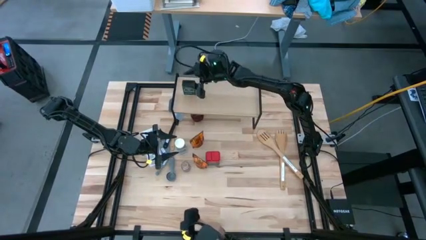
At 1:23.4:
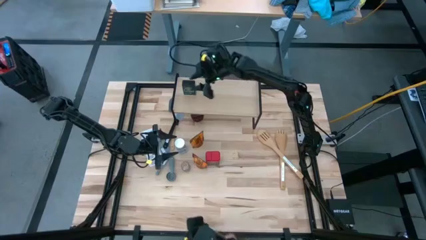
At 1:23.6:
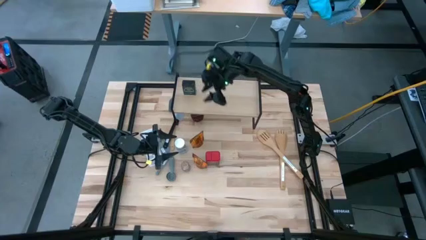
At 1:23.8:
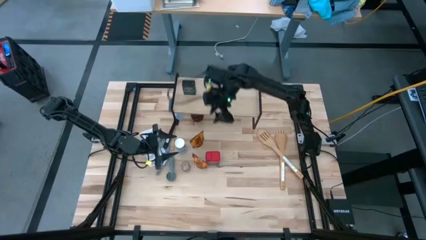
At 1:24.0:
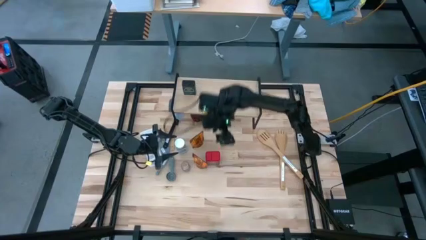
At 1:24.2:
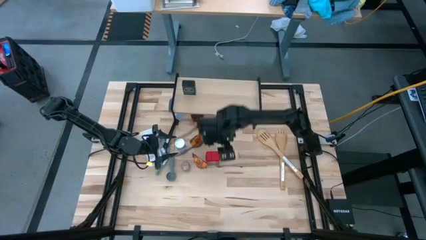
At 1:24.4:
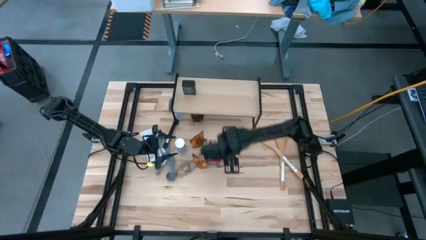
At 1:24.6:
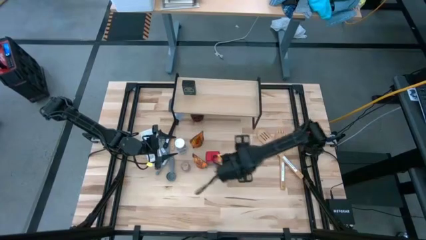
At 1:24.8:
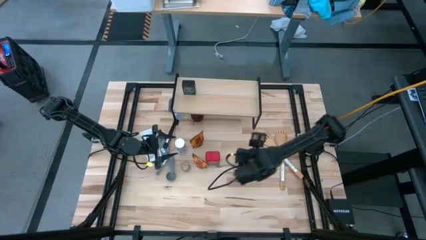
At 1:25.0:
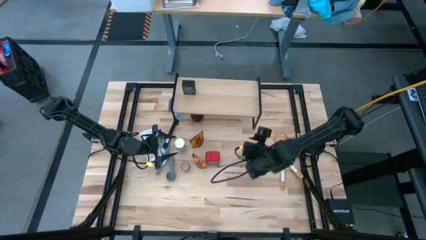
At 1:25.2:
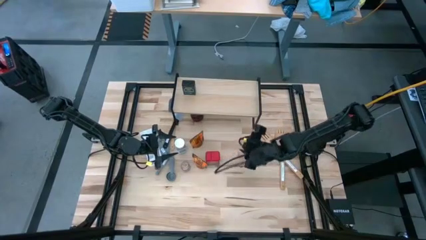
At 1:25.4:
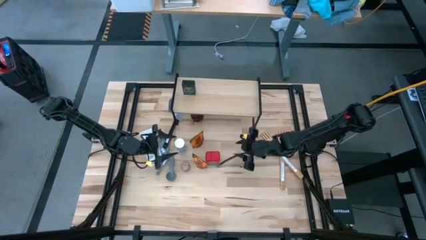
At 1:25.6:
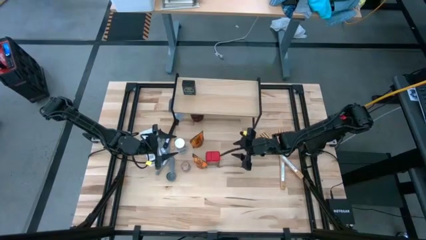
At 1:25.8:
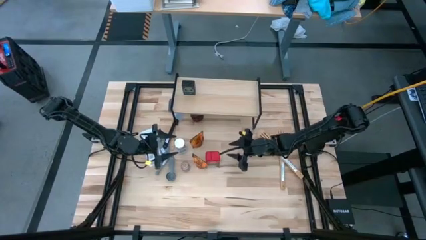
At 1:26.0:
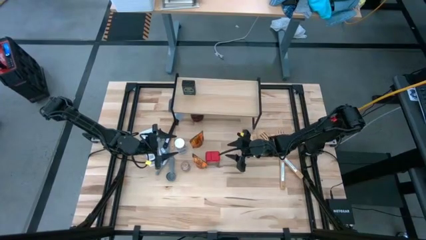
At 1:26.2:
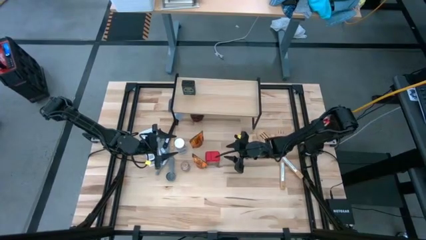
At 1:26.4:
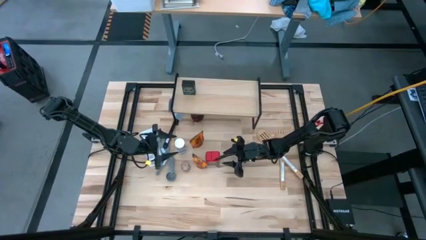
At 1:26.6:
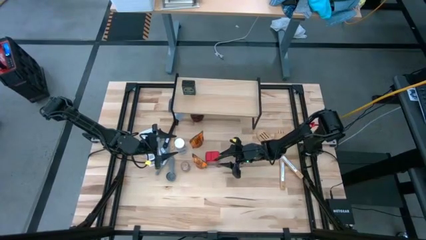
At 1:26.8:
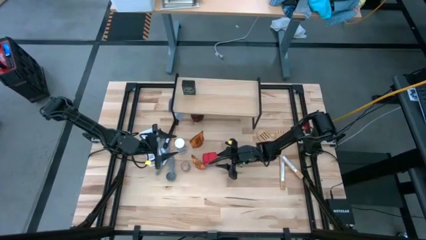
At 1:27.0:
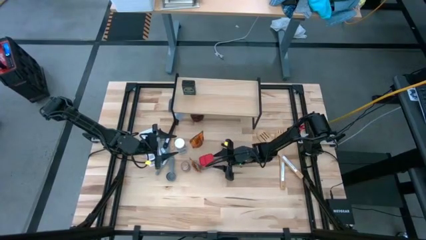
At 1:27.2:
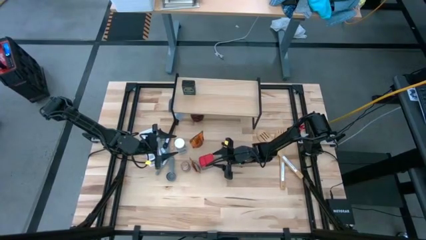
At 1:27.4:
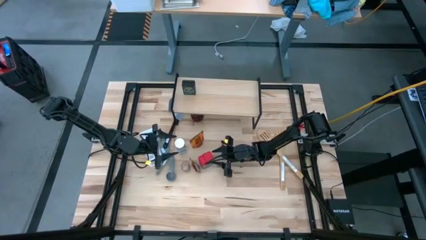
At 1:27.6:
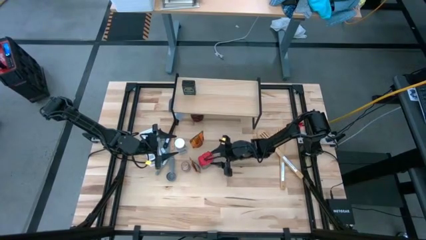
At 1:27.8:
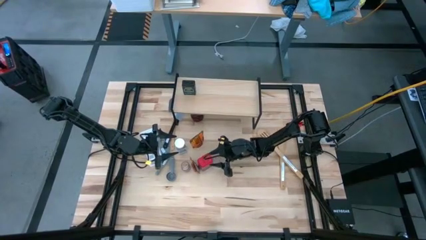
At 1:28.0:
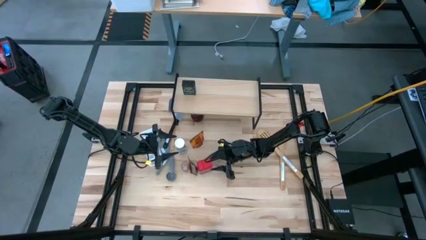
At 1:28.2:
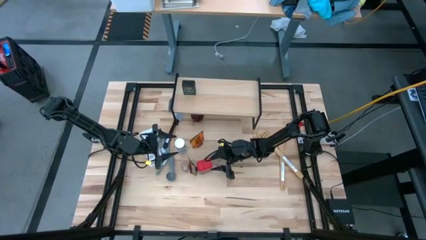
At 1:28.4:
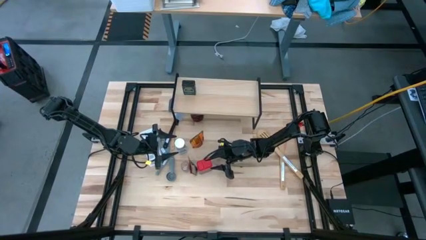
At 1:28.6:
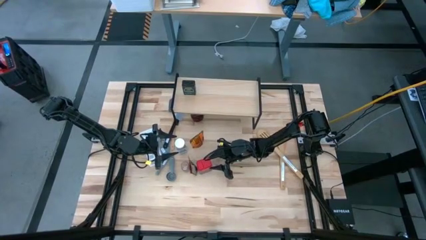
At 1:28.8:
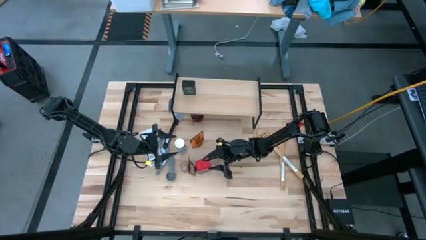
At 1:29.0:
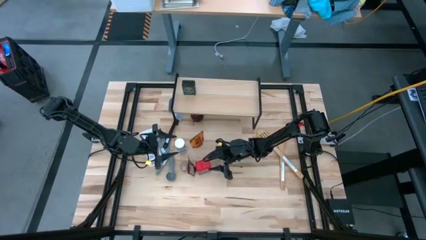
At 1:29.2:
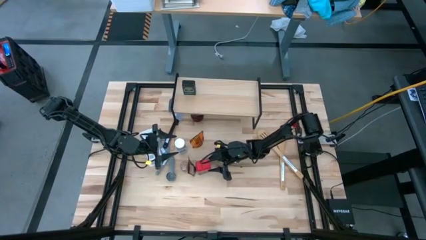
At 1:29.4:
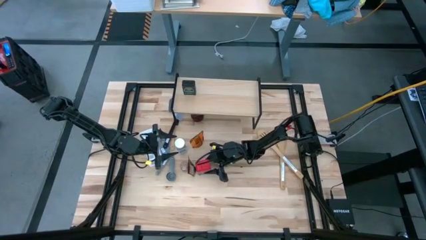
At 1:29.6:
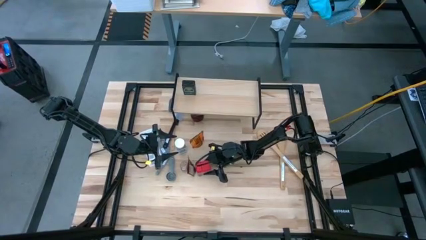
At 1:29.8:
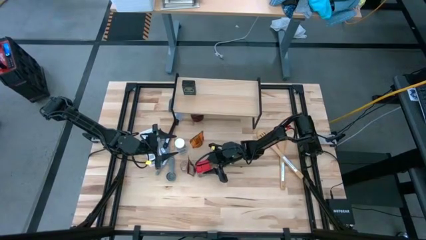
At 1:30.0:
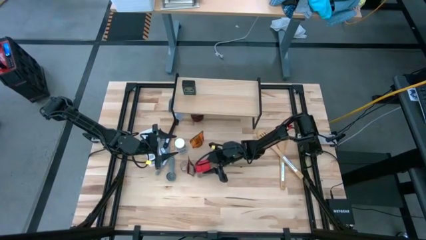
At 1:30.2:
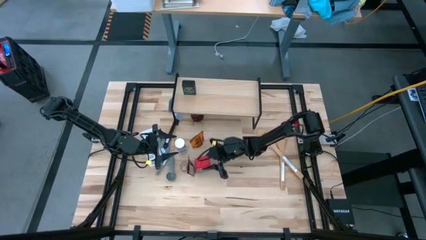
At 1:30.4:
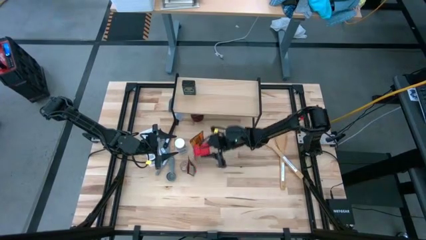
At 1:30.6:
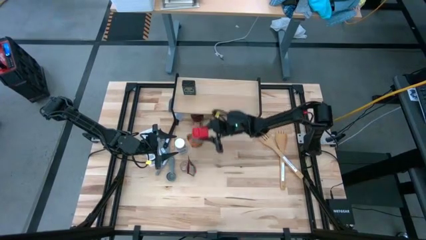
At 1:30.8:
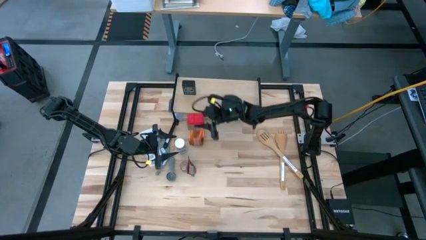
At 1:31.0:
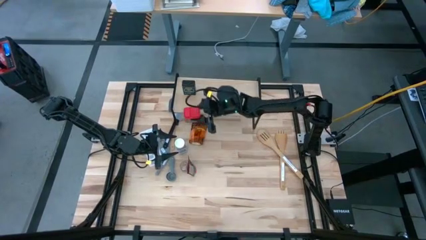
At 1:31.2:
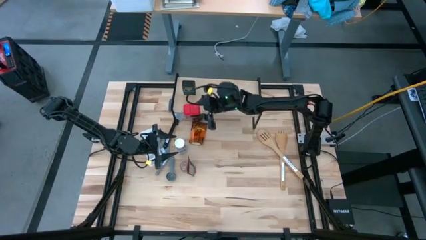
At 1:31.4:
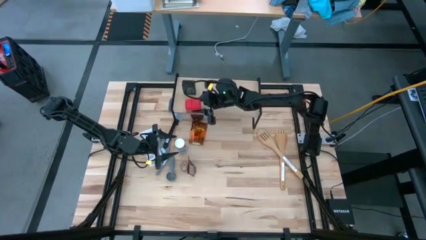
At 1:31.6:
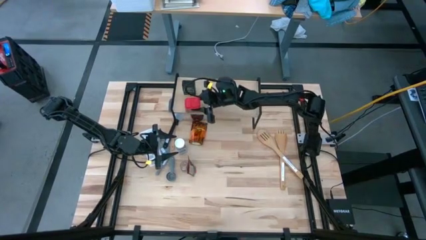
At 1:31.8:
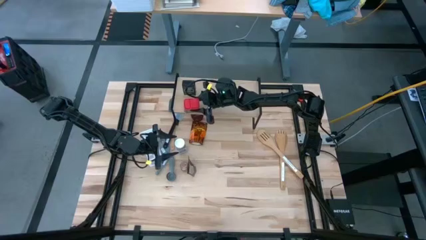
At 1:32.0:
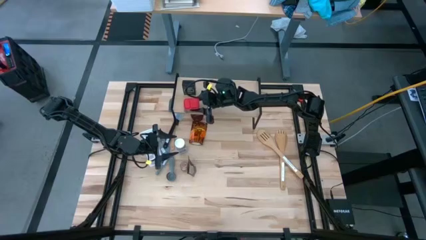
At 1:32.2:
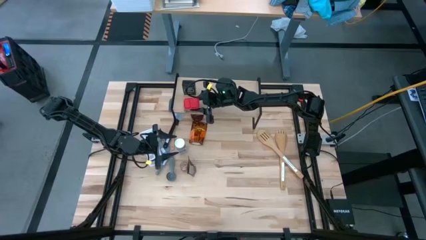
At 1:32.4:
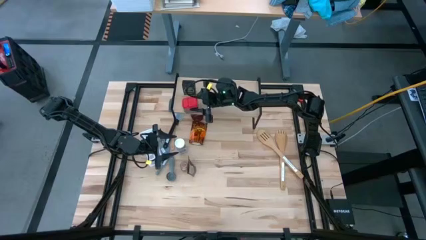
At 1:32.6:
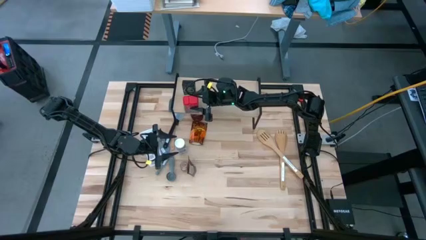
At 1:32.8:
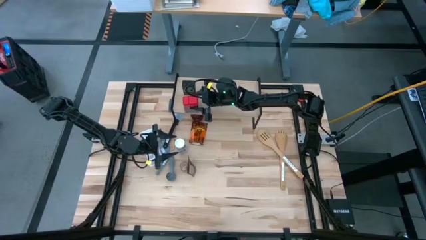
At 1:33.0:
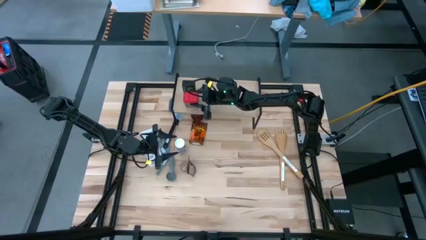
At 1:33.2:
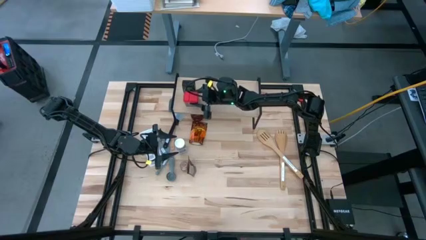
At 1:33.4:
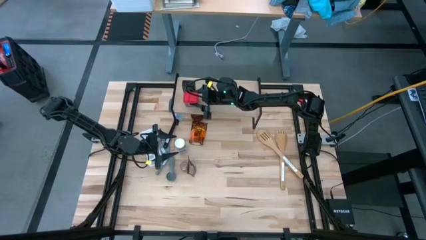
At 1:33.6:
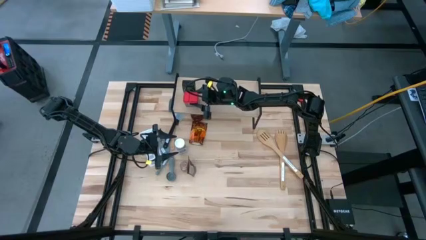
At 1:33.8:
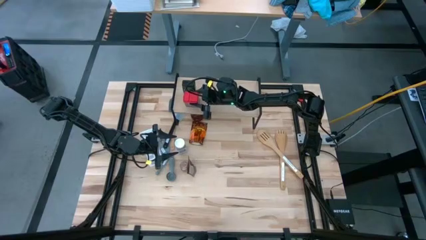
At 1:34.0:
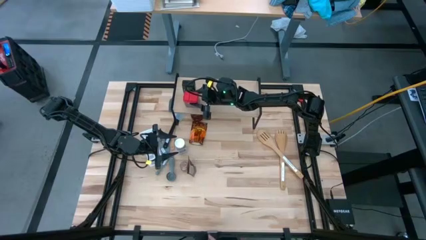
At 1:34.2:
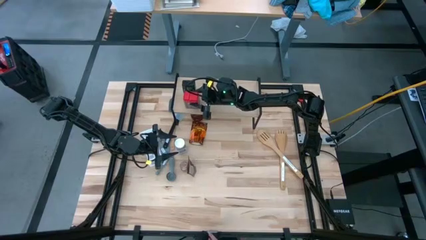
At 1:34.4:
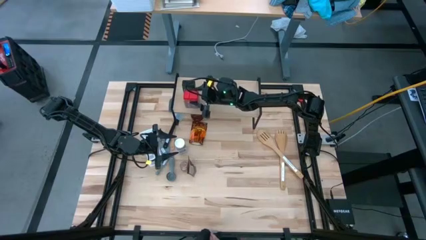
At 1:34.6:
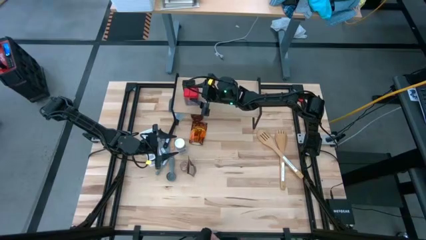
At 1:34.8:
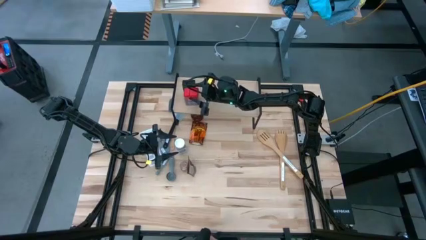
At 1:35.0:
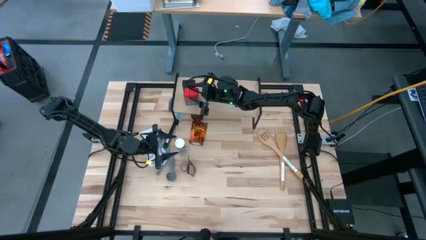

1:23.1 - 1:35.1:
Task: Shelf spices
Put the red seasoning can on the shelf

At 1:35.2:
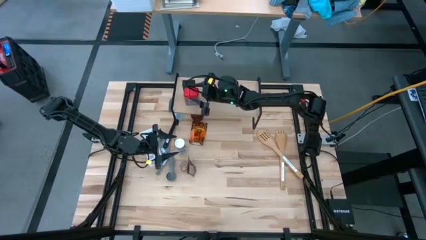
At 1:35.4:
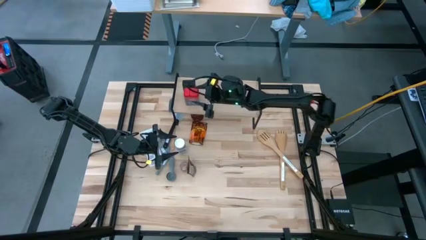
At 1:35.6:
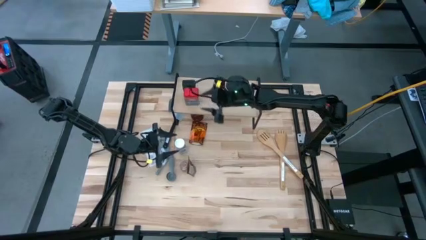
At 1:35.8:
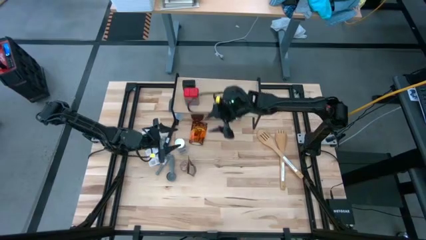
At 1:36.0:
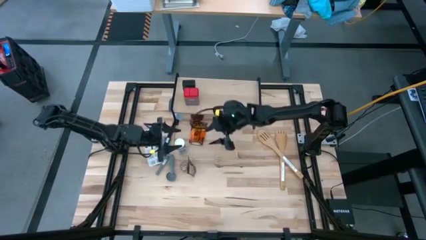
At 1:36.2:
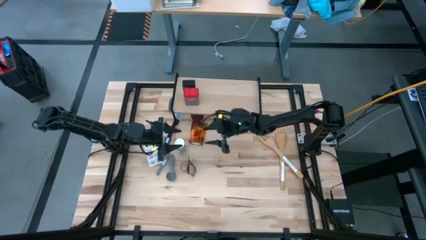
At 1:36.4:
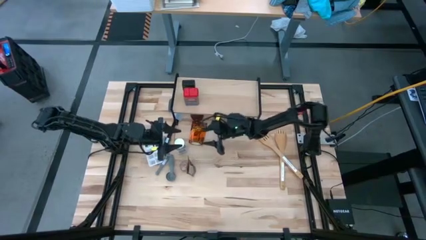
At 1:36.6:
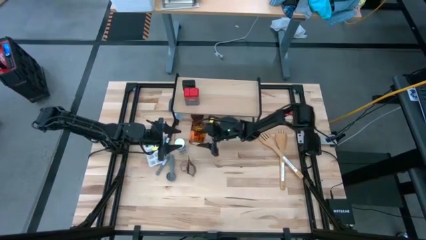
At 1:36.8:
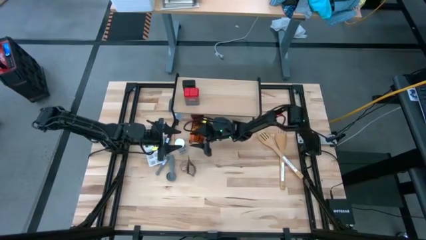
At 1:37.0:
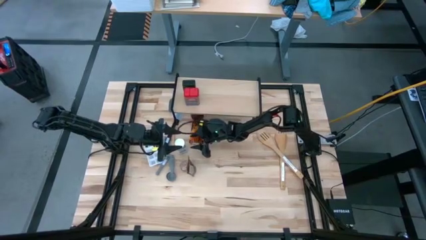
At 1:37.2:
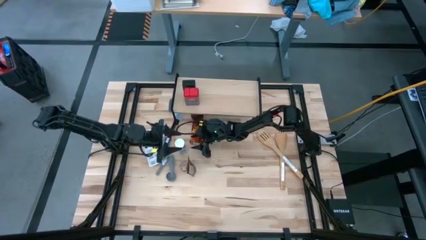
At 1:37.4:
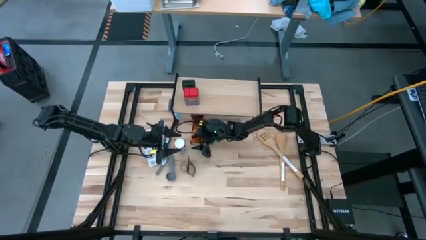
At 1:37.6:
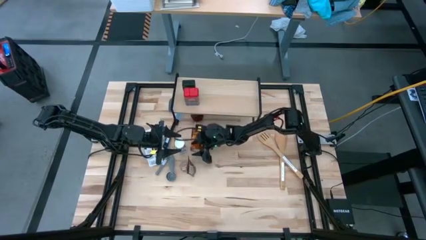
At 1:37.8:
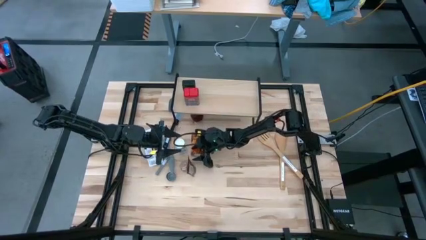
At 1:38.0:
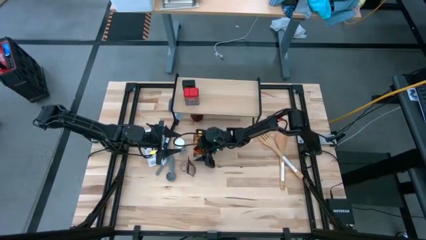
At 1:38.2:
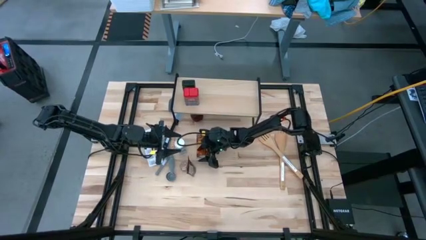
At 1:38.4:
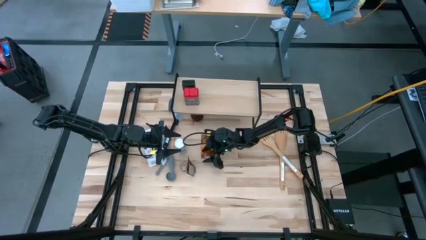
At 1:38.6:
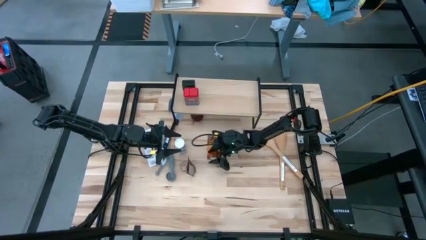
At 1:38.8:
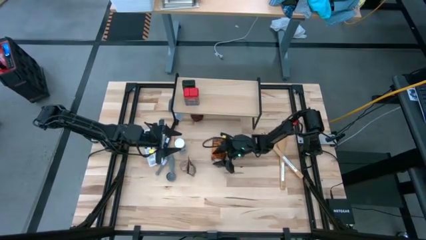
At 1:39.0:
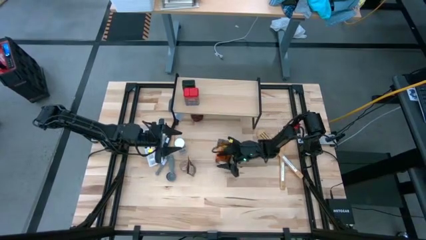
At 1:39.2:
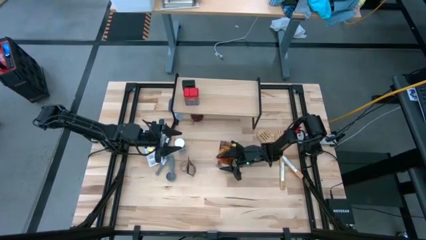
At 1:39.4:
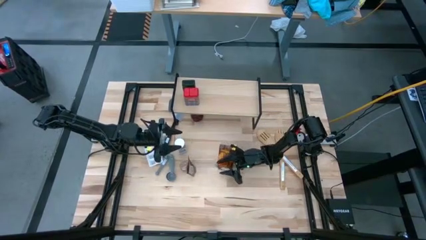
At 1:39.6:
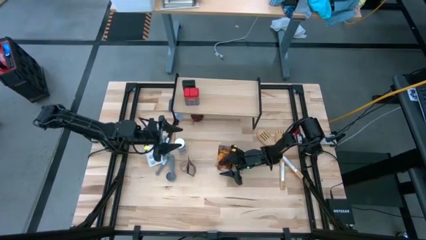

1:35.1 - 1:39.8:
Move the top orange seasoning pack to the center of the table
